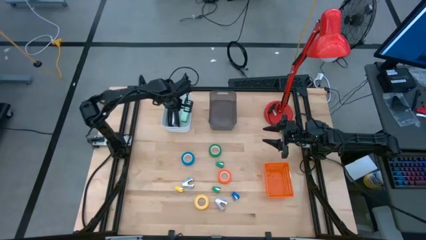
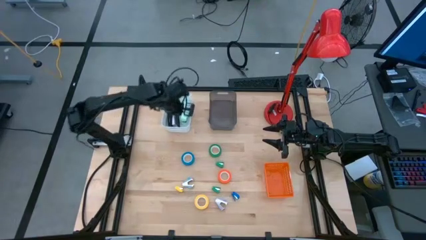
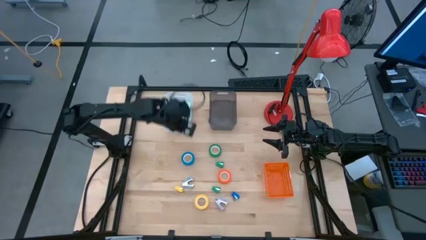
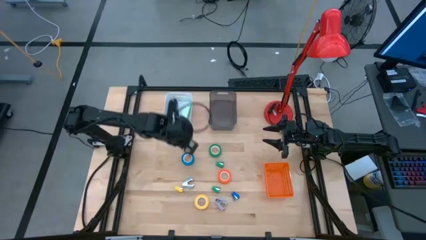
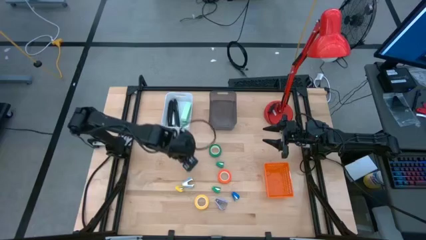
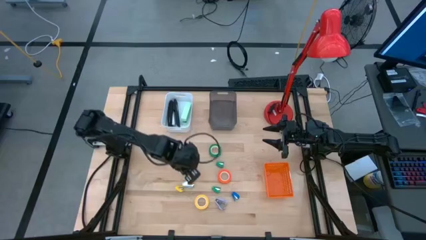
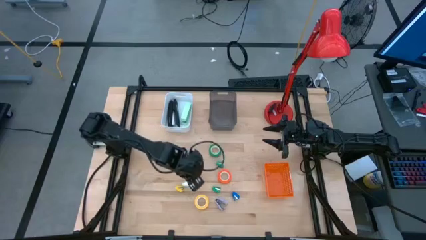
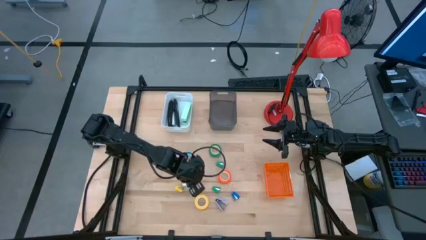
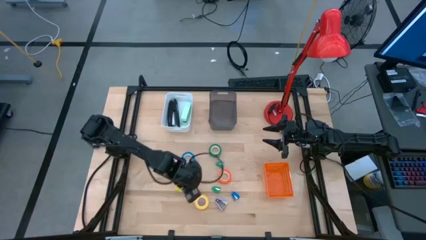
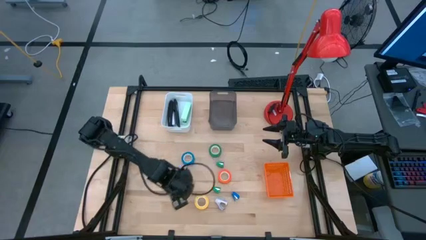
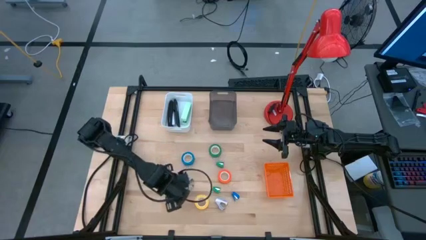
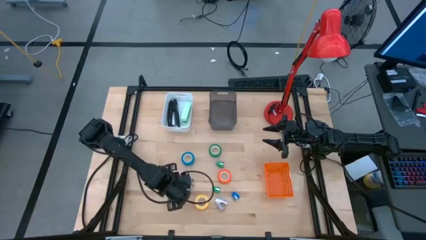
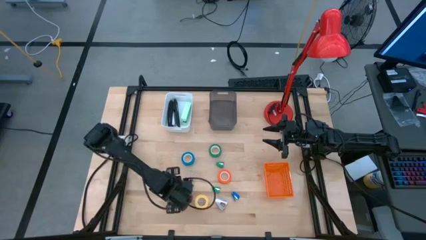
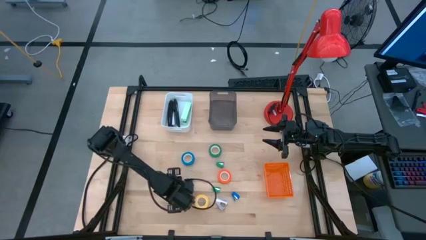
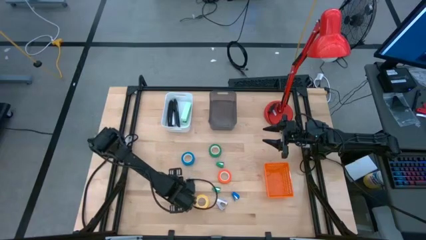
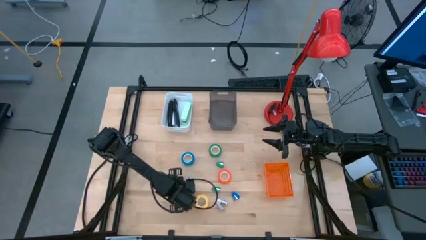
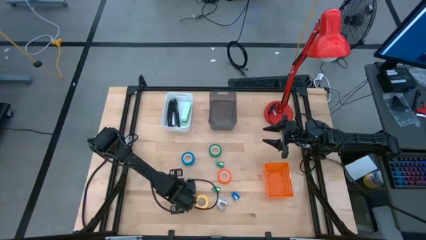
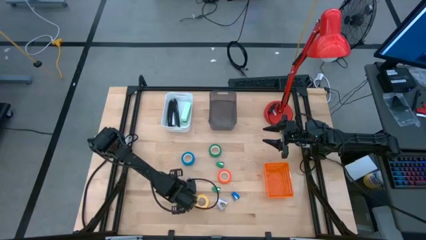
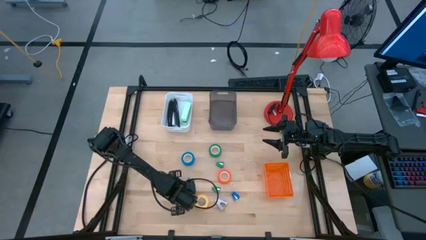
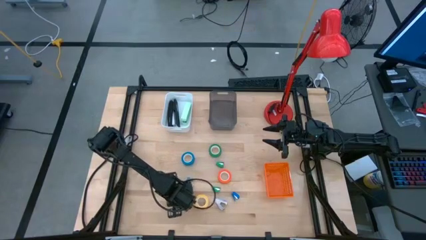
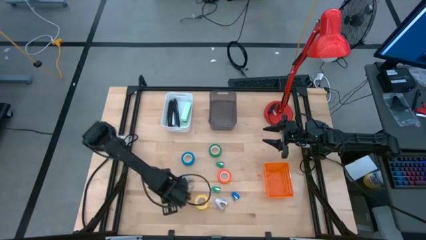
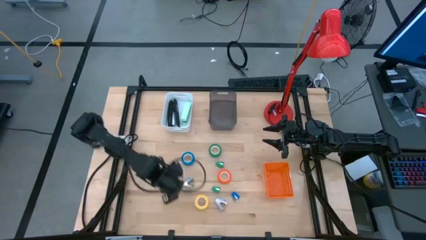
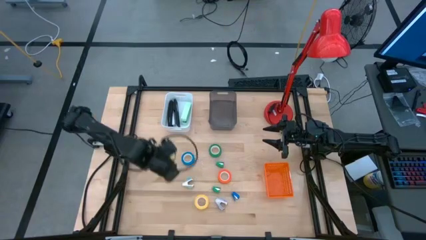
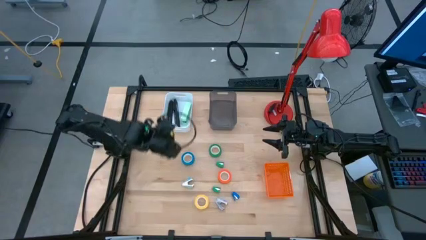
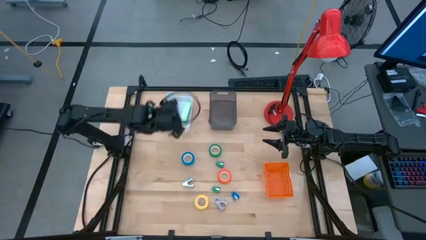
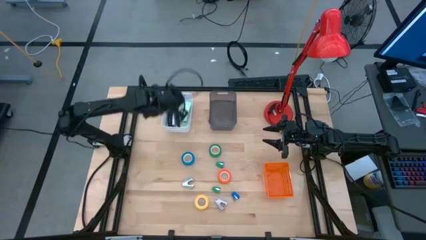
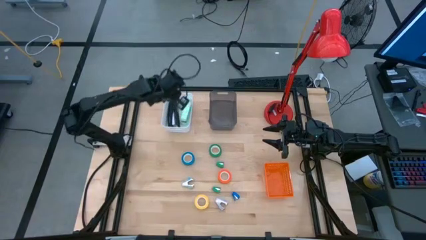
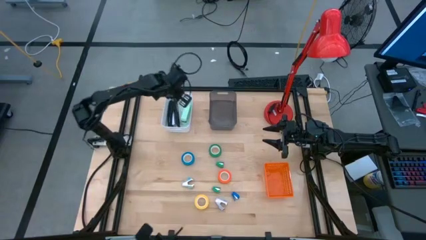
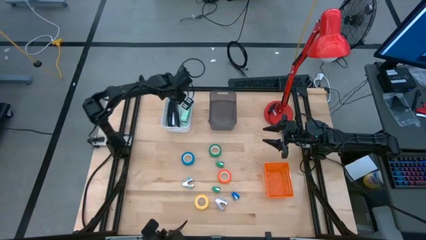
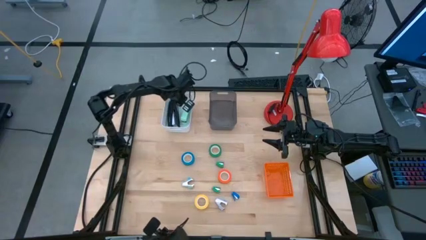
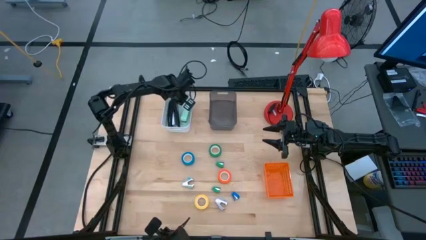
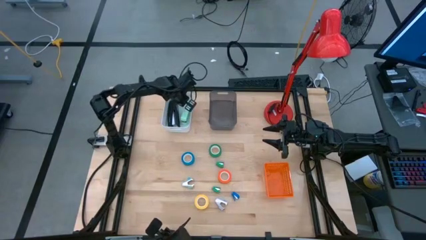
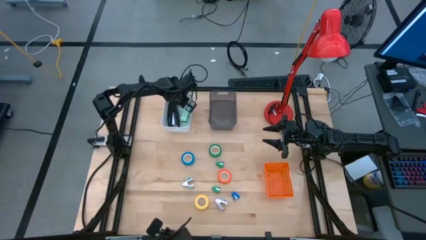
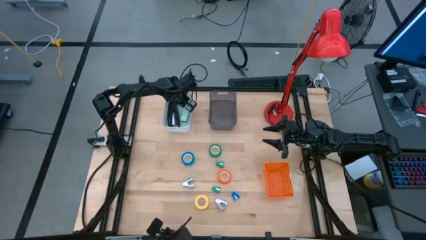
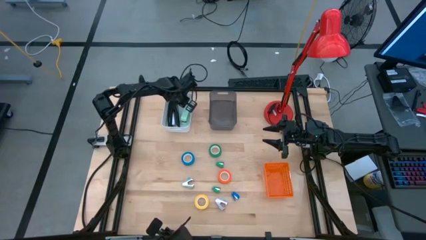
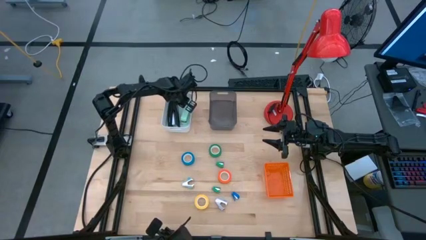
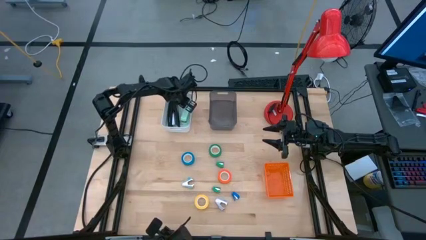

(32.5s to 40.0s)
Task: Pick and place Stapler, Stapler remover, tape
Put the yellow stapler into the white bin

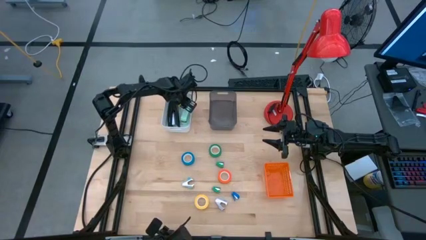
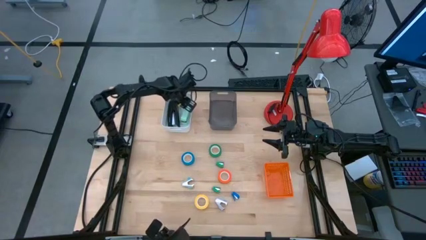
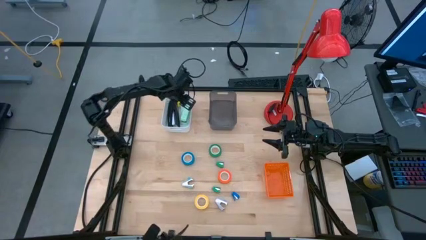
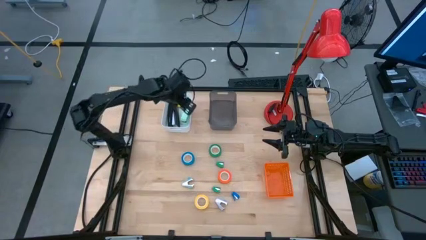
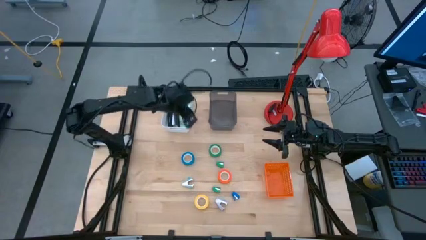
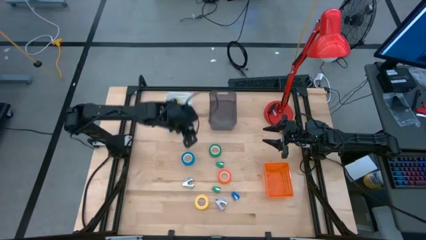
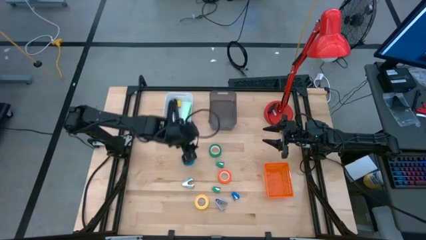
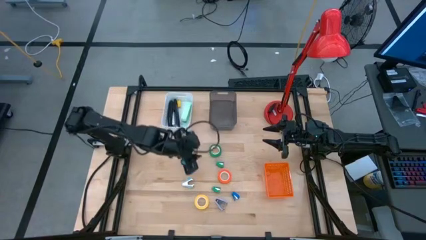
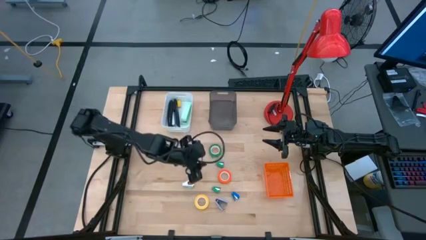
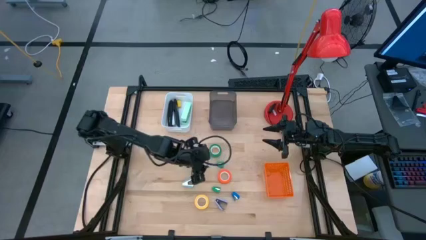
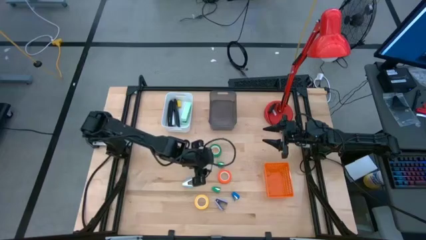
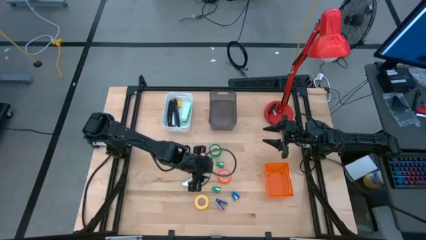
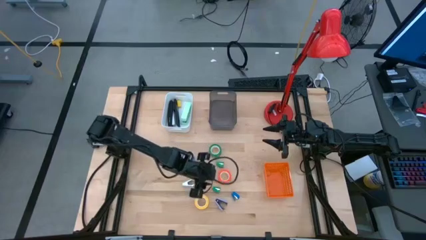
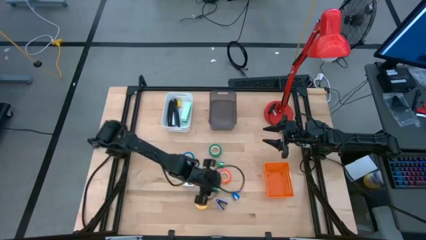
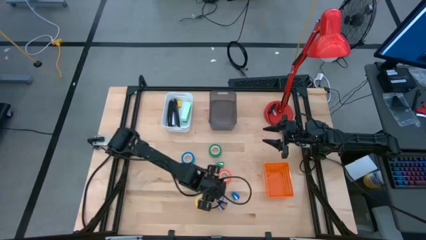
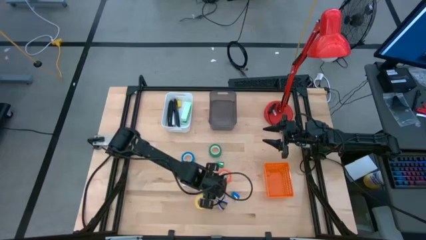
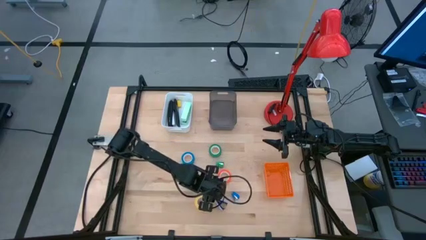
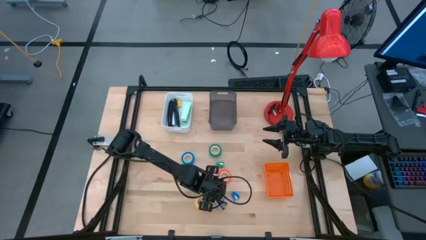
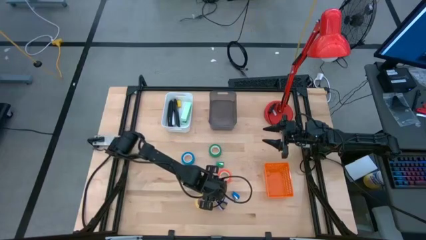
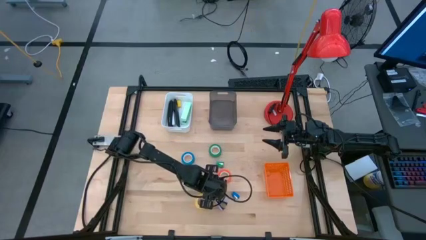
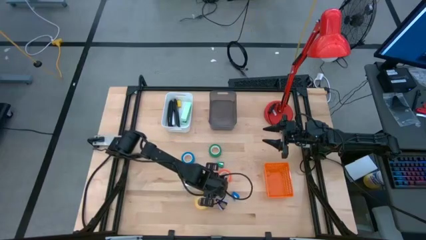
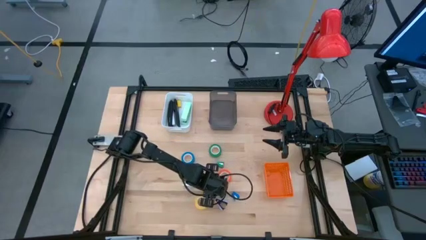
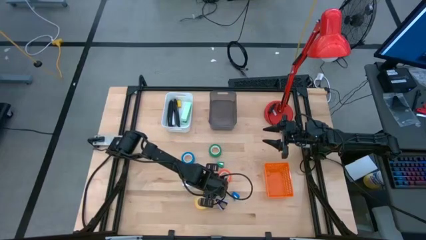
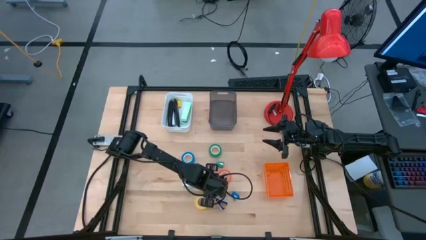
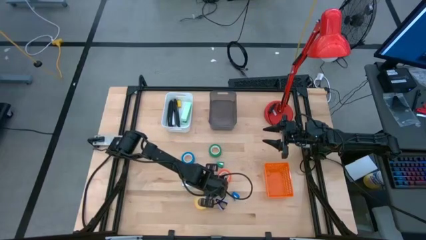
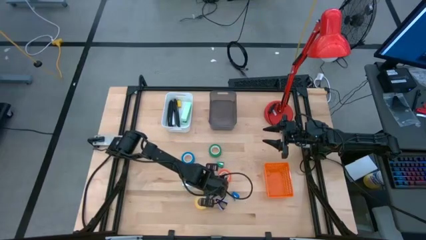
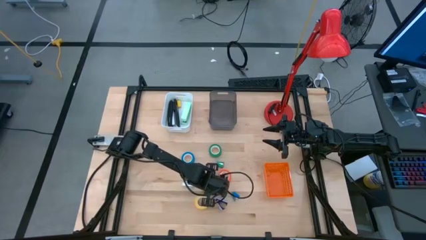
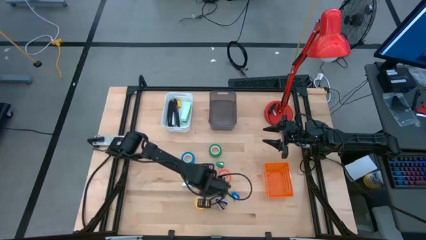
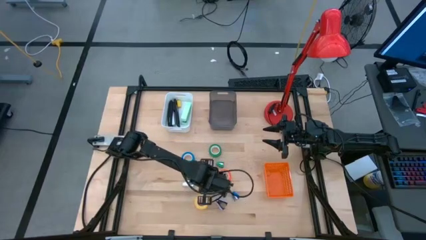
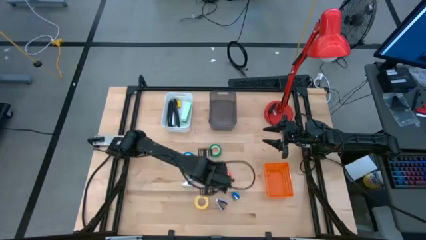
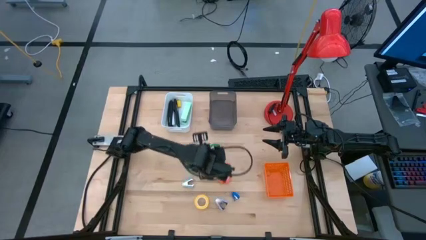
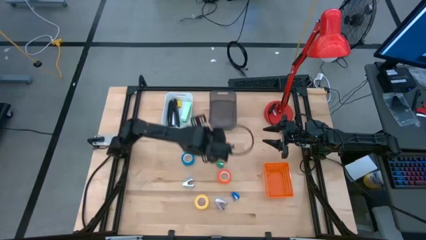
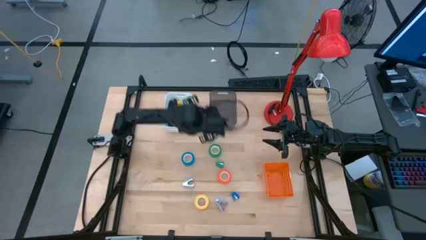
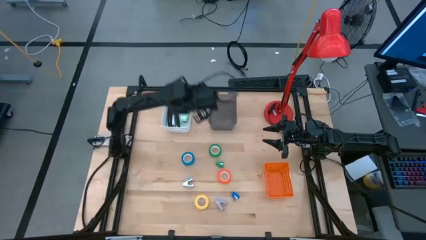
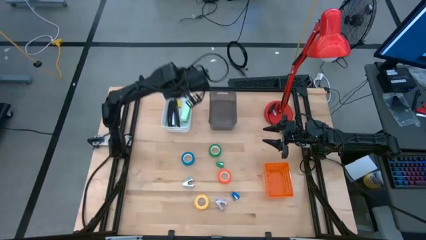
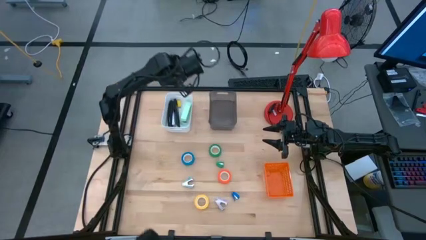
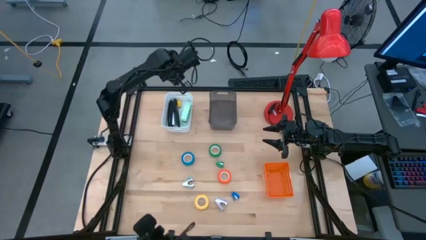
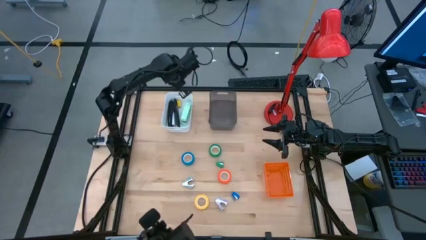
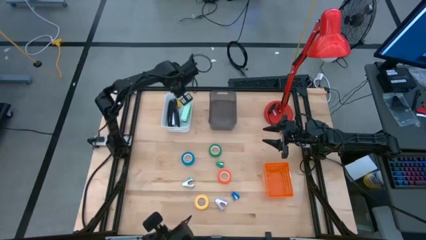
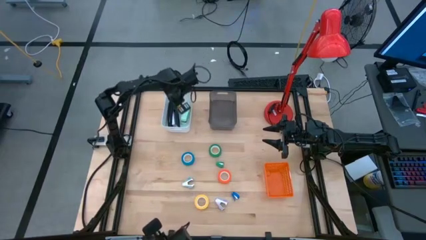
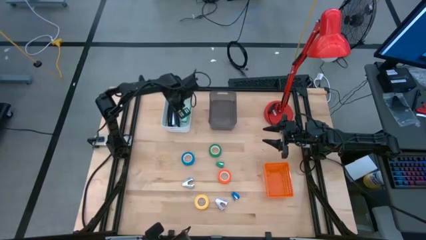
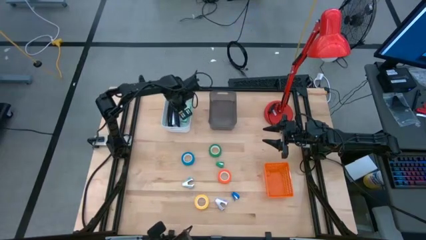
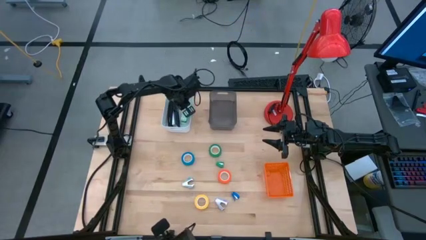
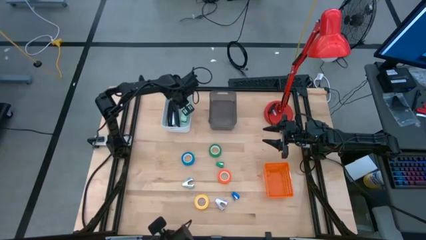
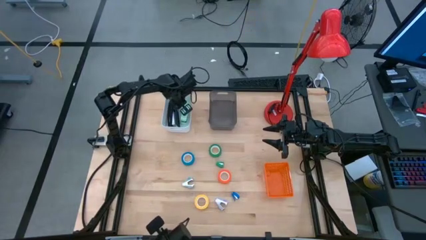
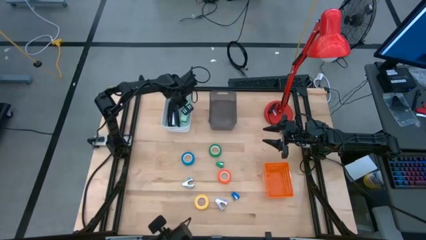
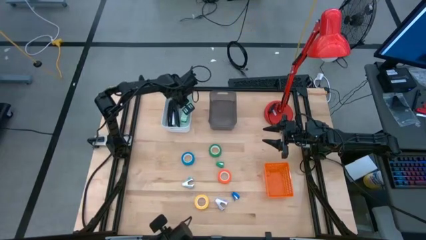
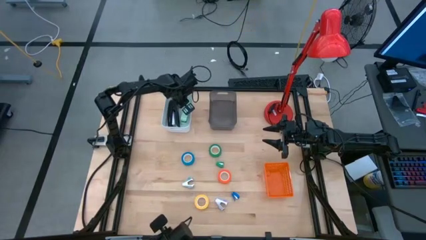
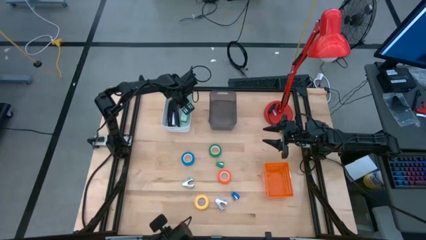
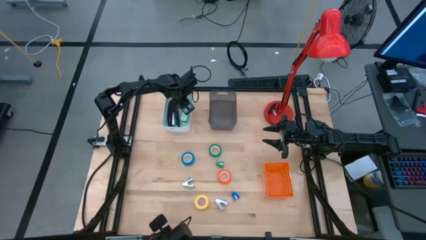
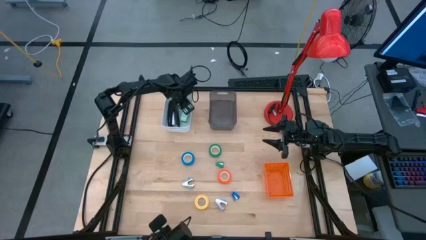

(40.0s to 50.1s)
Put the bottom green stapler into the white bin
